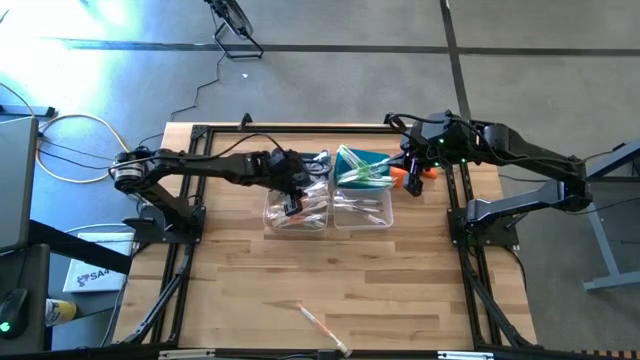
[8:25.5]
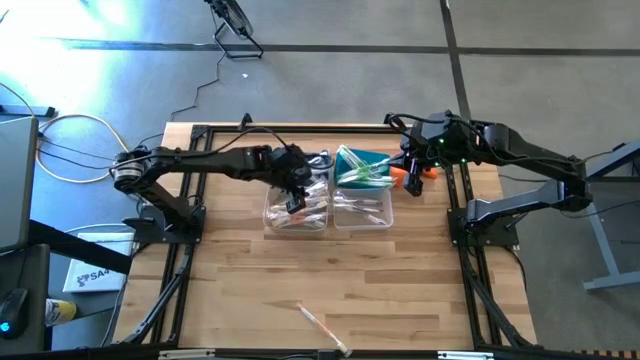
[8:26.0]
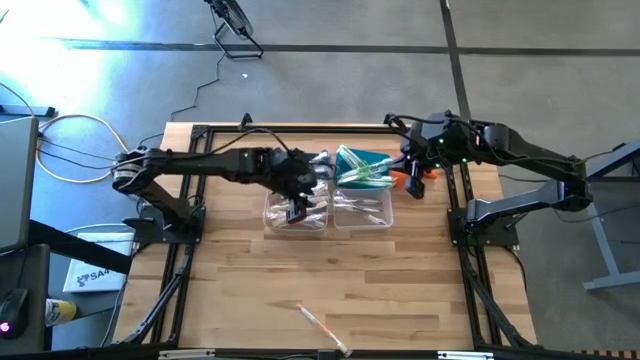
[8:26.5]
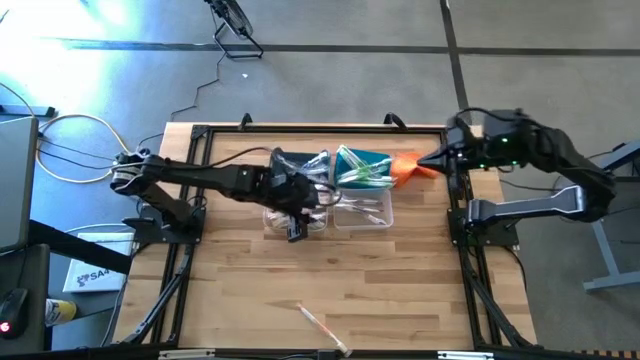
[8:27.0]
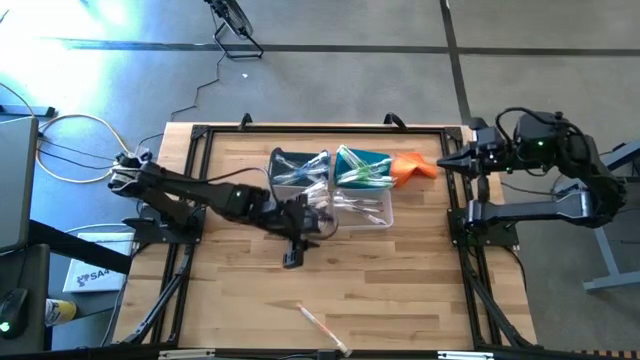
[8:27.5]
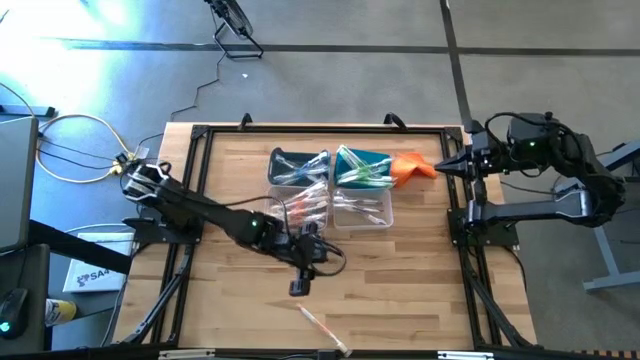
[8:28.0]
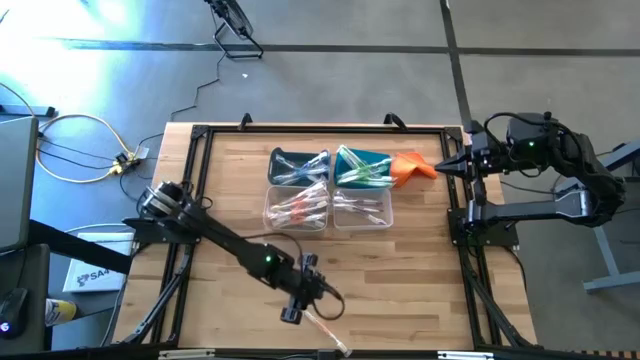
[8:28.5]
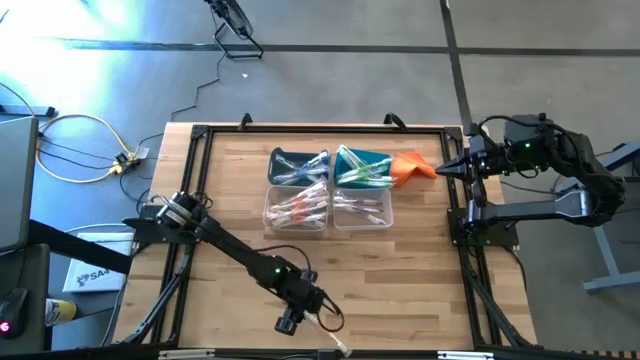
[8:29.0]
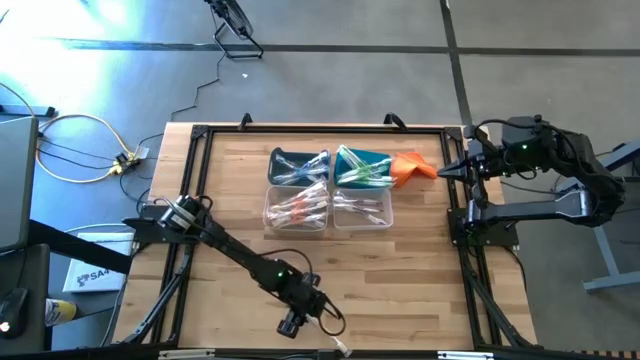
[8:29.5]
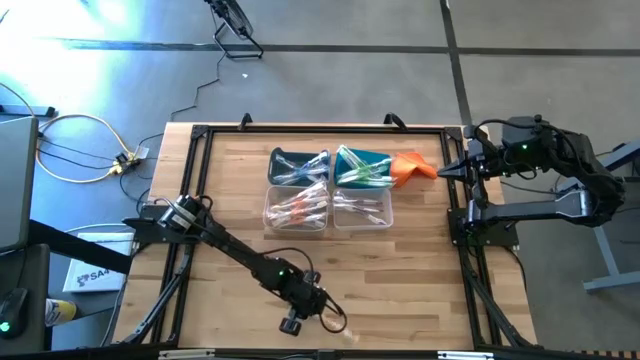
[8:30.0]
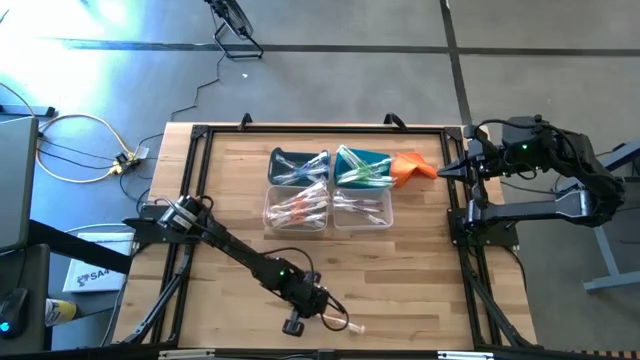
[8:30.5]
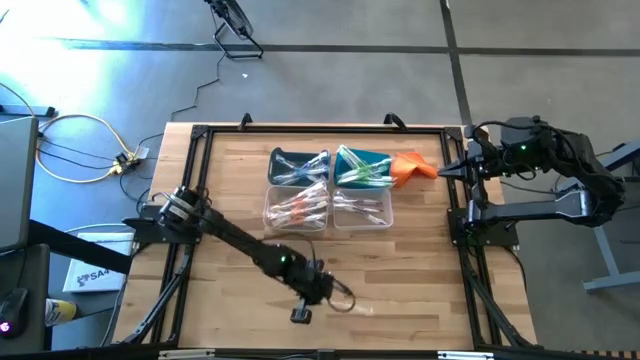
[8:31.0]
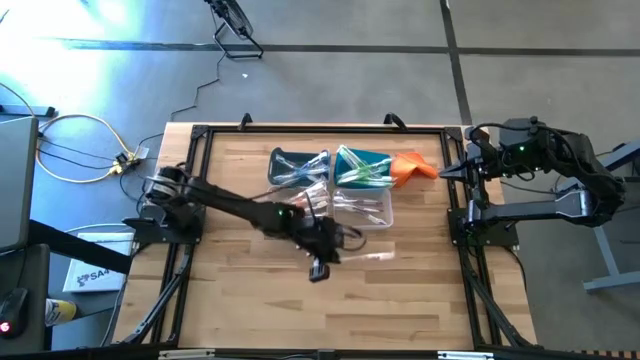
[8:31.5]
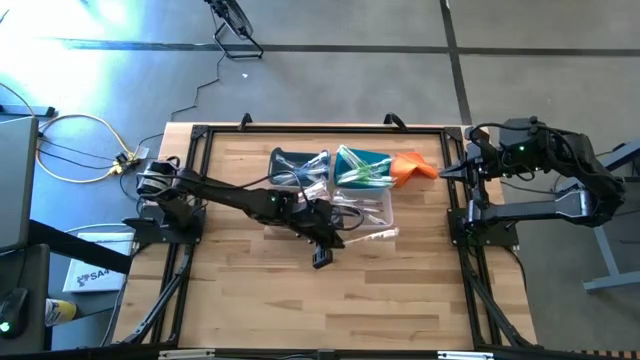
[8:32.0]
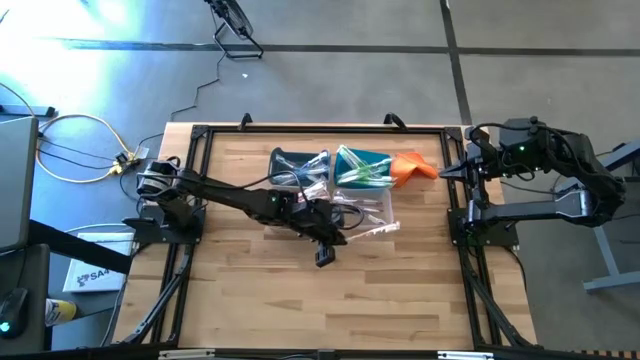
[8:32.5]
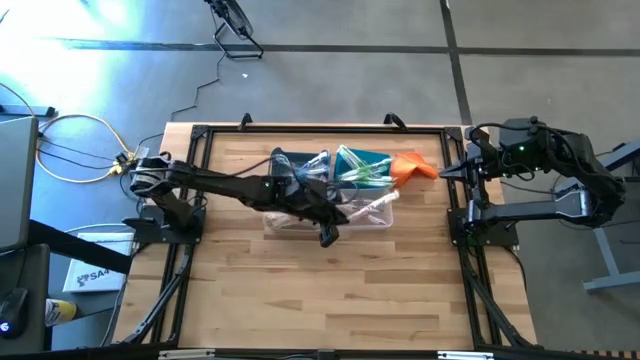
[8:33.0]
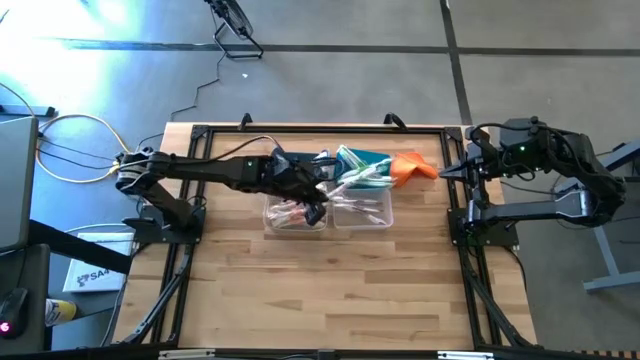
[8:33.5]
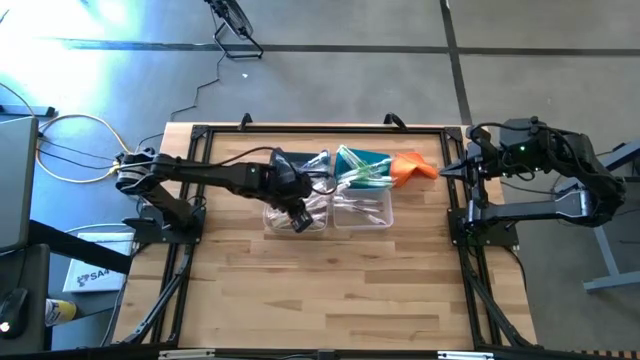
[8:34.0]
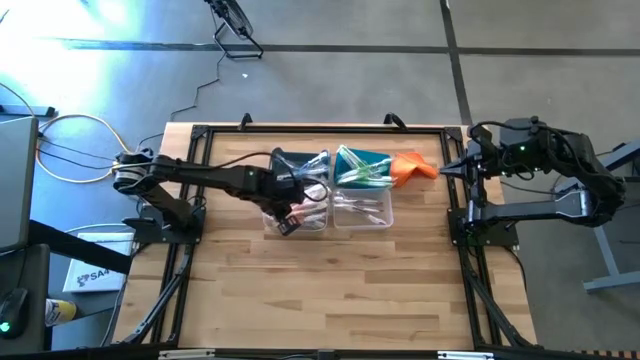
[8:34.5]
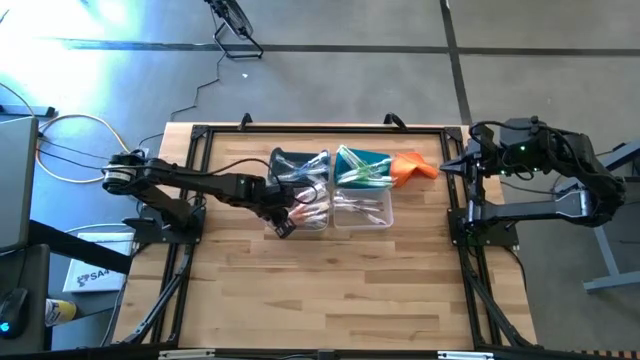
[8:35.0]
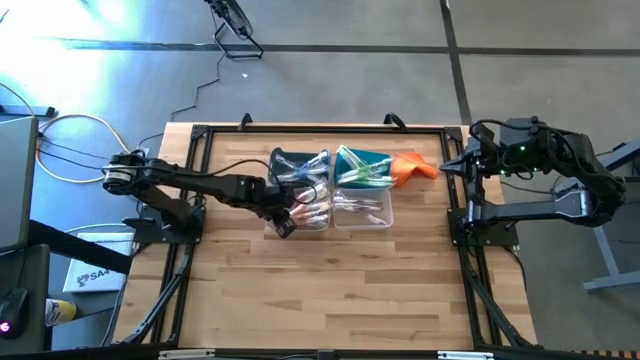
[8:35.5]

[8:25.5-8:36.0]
Task: Pick & Place Toothbrushes
Put the orange toothbrush into the gray bin

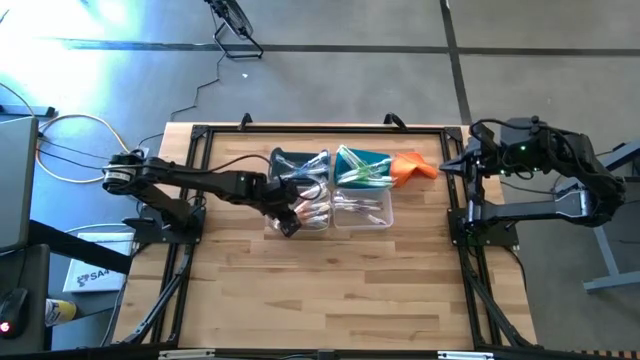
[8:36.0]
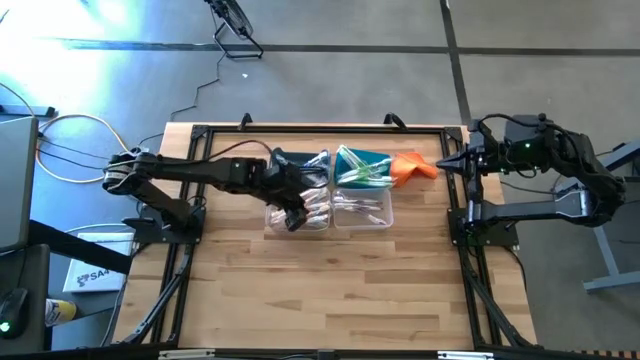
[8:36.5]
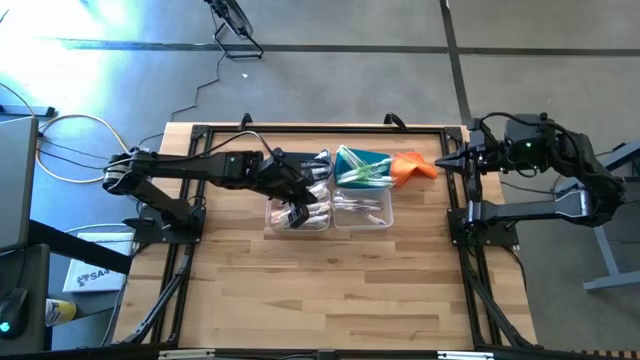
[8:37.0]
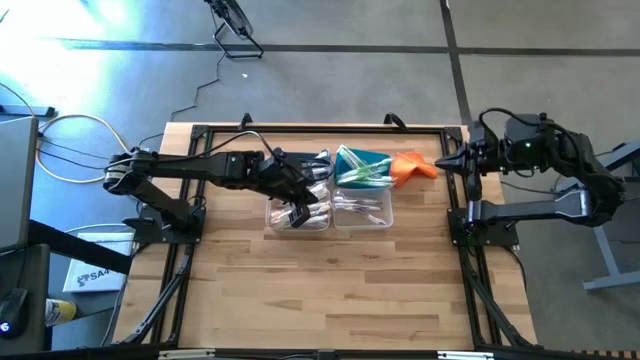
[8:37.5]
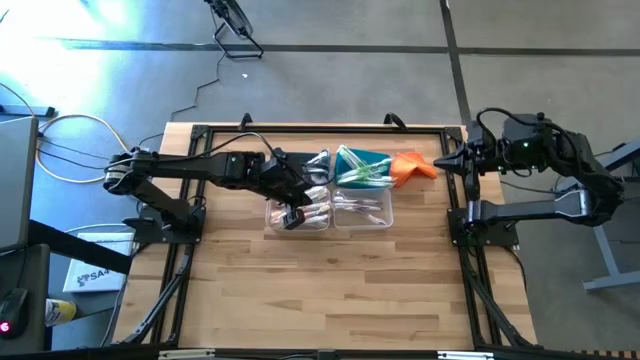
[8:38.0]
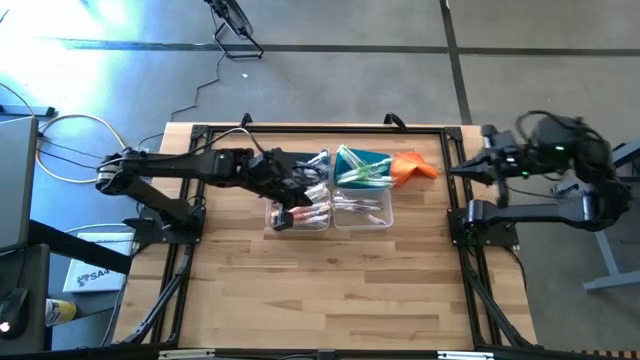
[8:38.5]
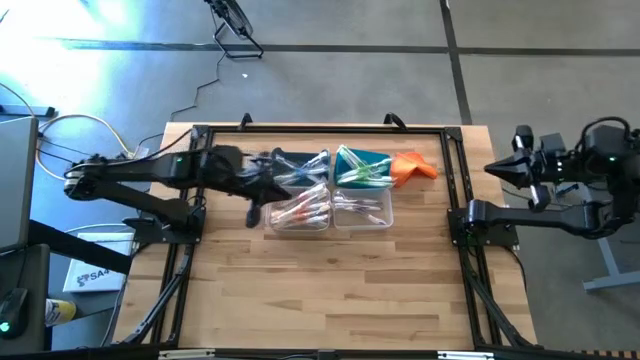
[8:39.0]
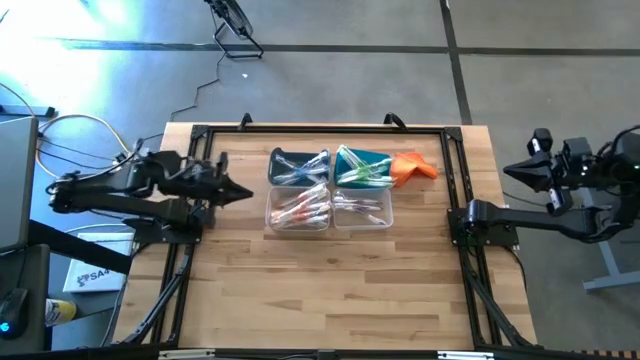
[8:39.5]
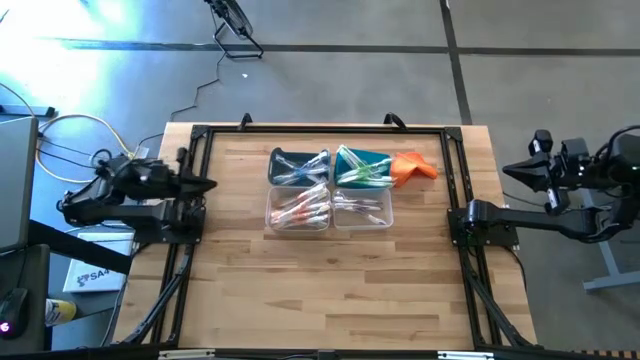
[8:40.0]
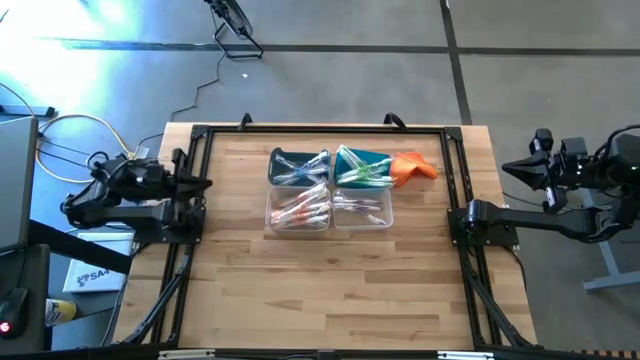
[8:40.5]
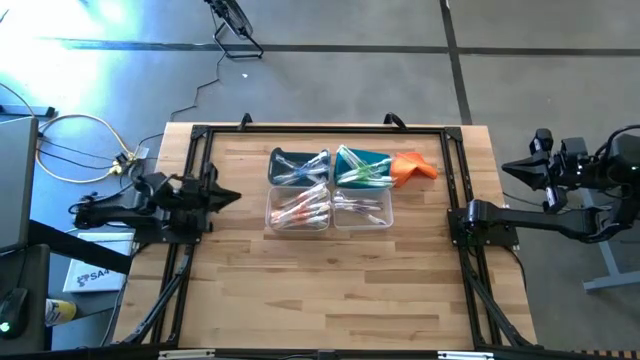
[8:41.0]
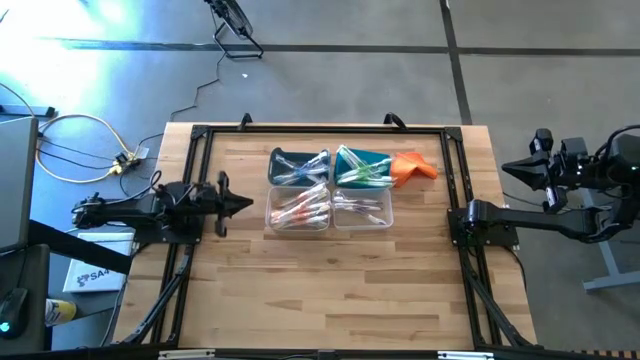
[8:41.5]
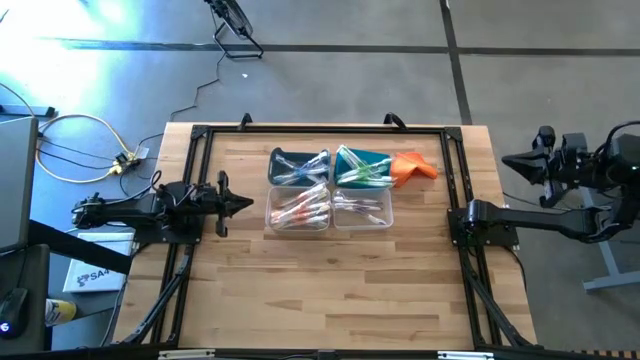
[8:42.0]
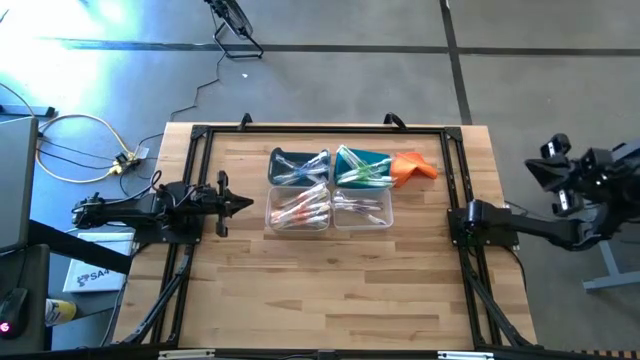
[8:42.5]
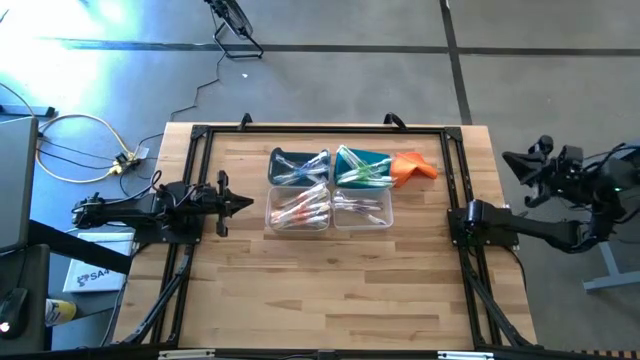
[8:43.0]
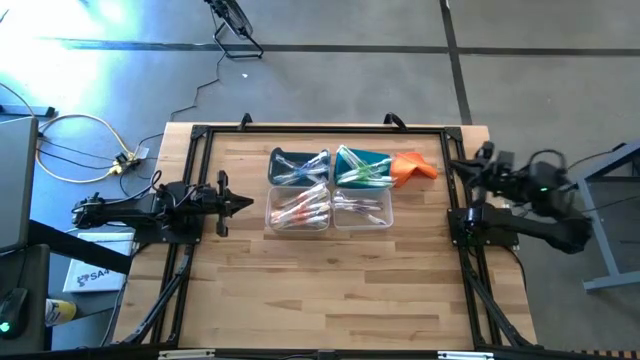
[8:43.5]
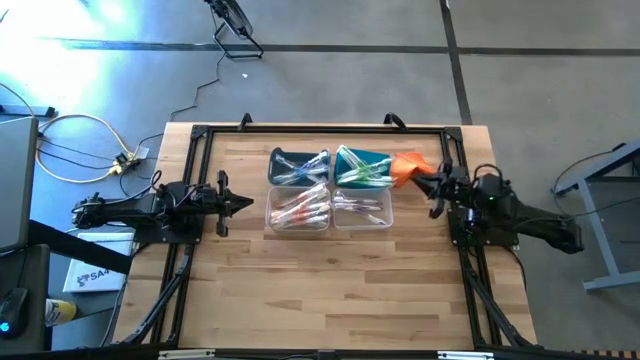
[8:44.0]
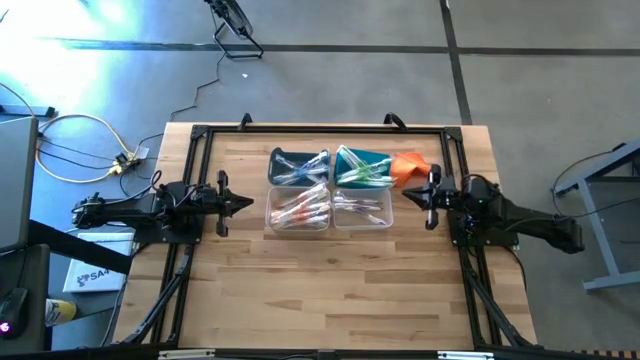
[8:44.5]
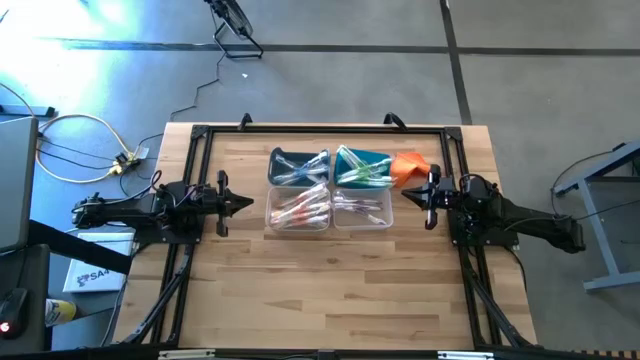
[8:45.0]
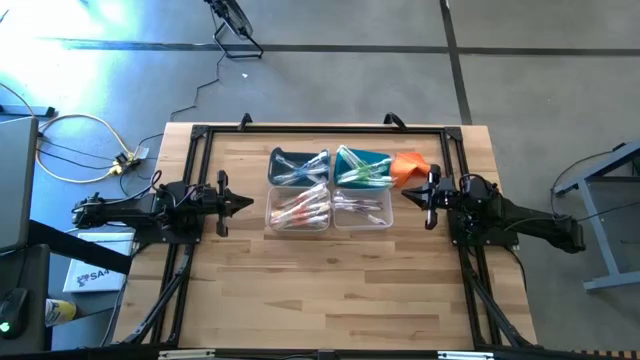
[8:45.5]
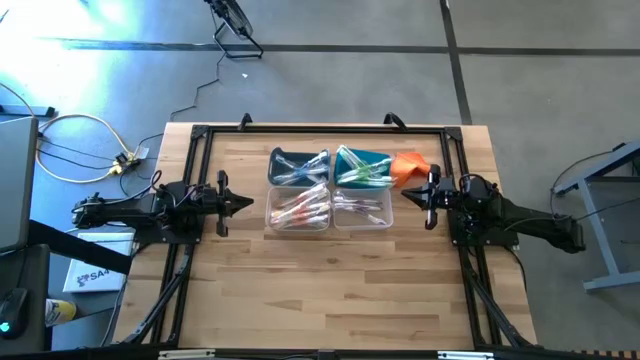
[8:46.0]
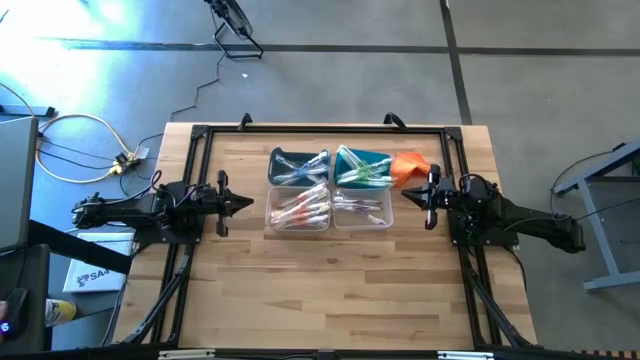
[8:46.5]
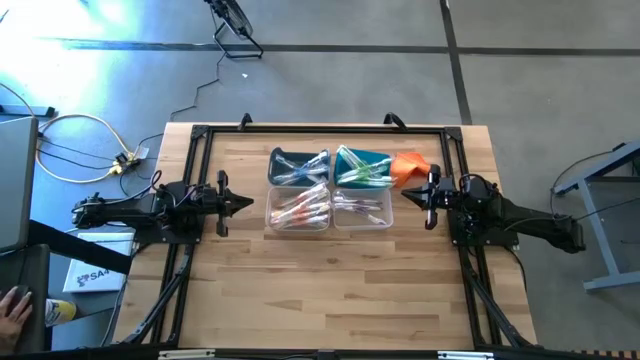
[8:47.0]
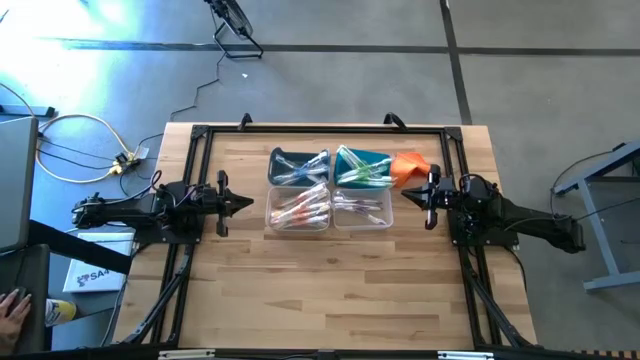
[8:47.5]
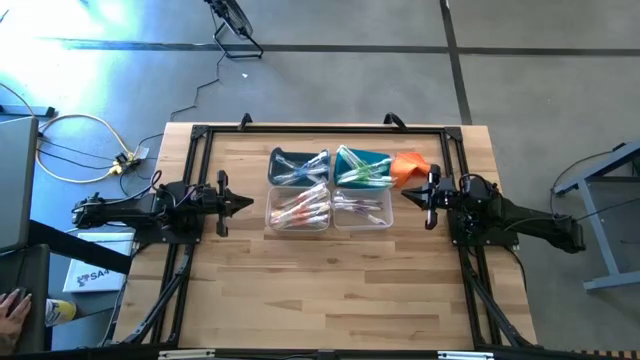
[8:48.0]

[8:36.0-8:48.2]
Return to Home Position
